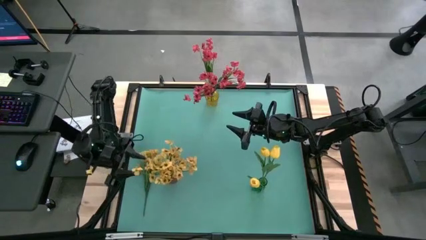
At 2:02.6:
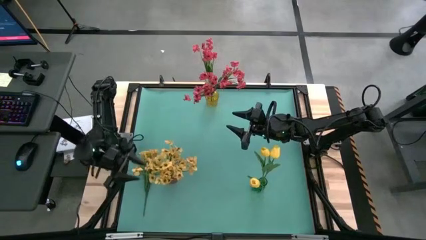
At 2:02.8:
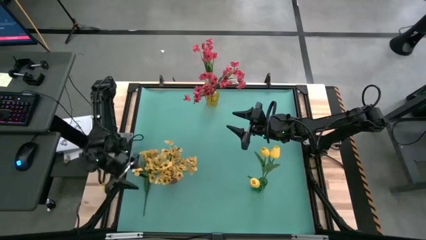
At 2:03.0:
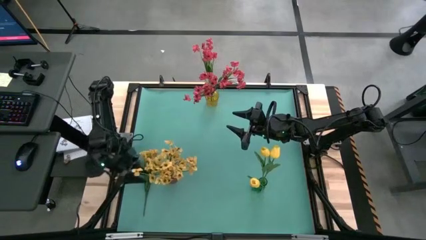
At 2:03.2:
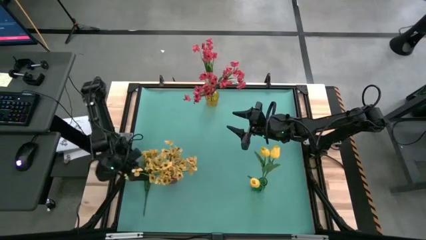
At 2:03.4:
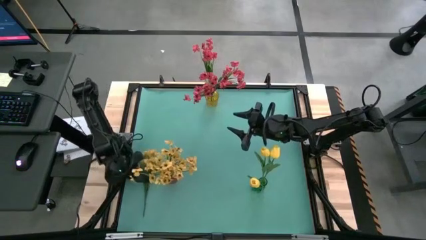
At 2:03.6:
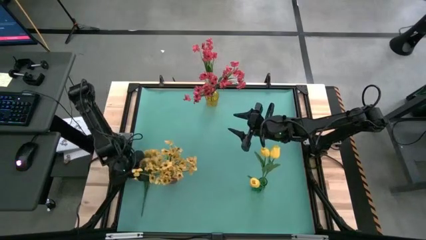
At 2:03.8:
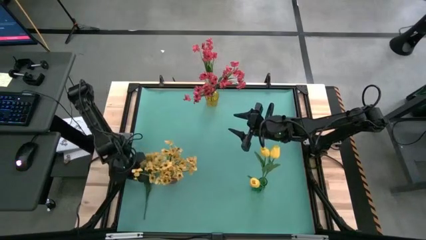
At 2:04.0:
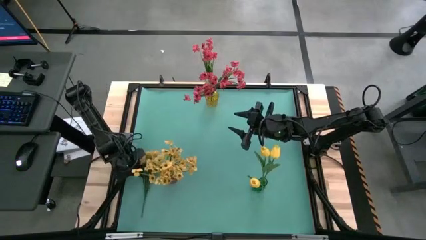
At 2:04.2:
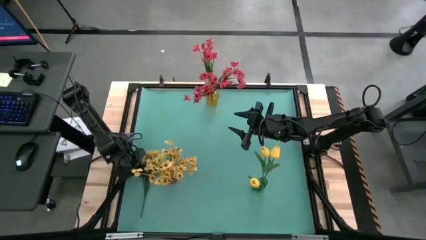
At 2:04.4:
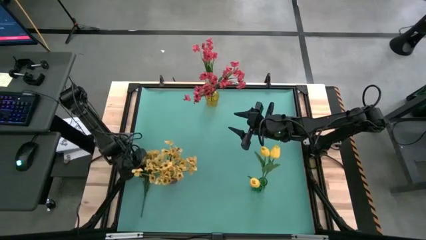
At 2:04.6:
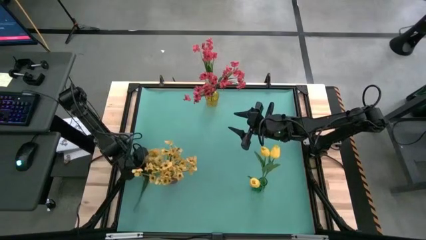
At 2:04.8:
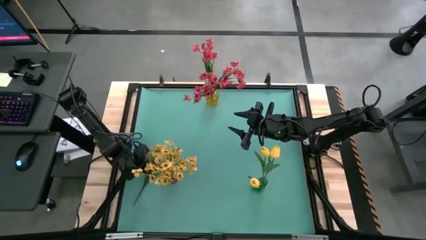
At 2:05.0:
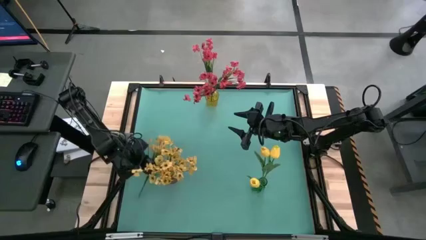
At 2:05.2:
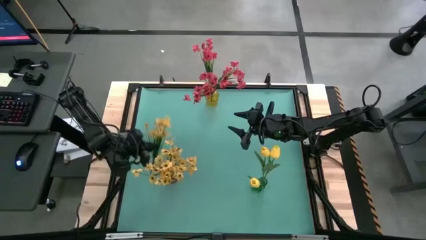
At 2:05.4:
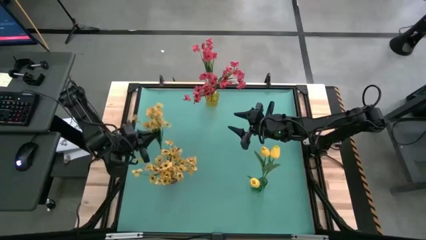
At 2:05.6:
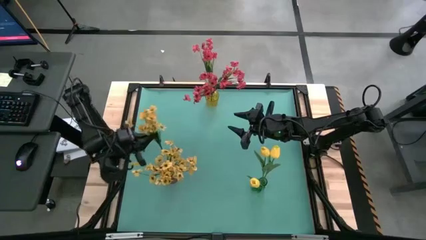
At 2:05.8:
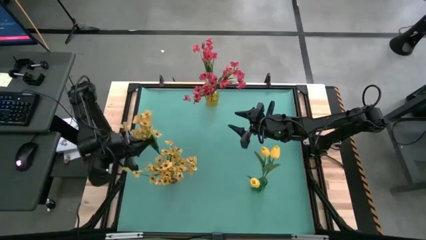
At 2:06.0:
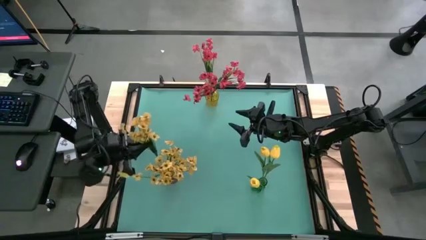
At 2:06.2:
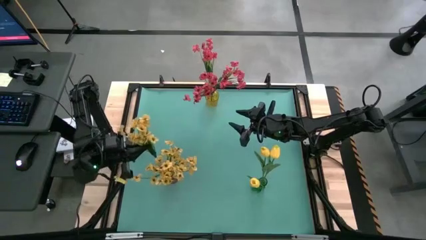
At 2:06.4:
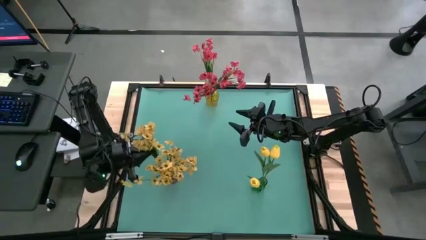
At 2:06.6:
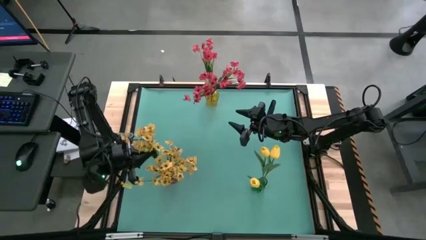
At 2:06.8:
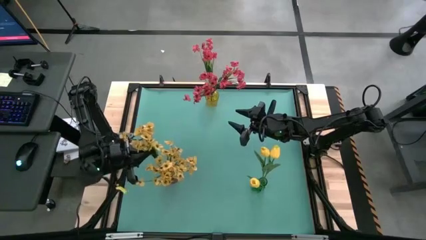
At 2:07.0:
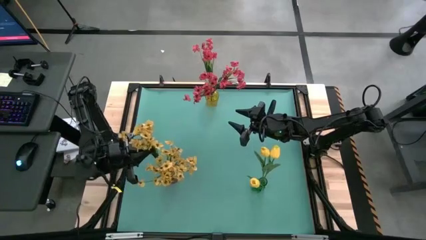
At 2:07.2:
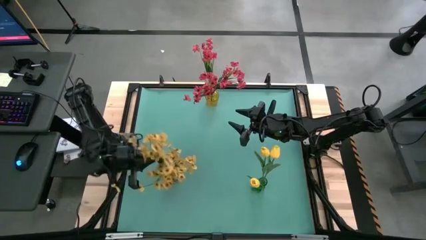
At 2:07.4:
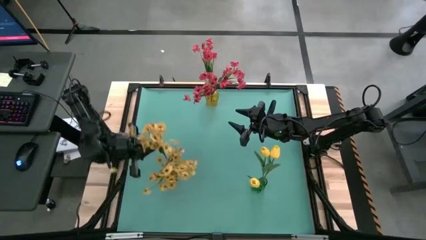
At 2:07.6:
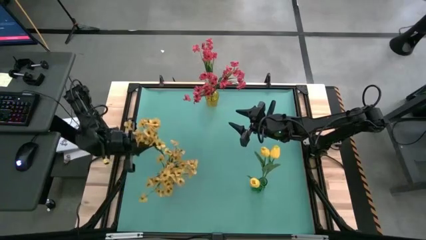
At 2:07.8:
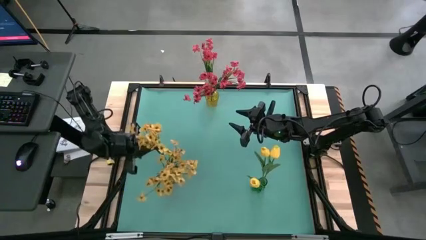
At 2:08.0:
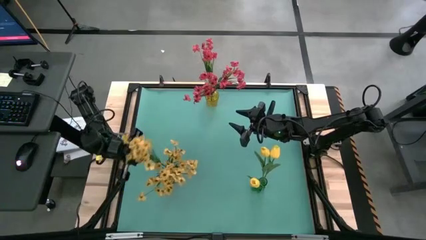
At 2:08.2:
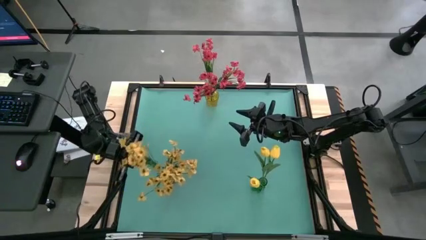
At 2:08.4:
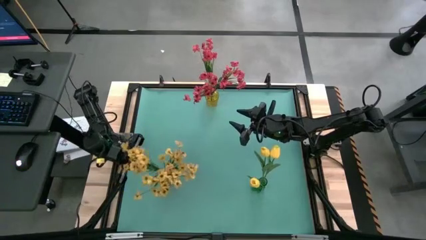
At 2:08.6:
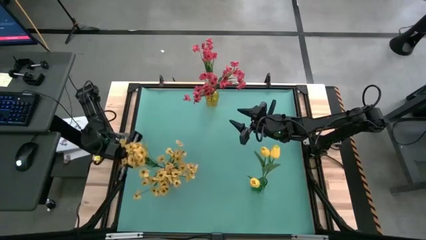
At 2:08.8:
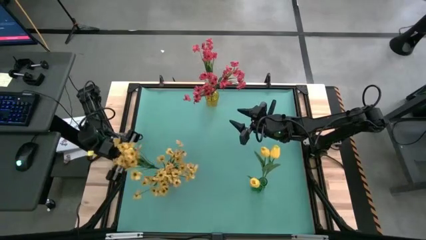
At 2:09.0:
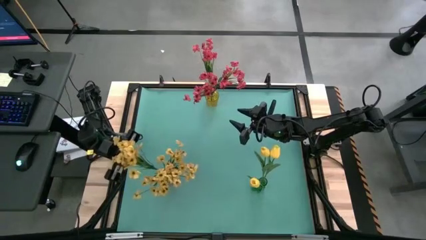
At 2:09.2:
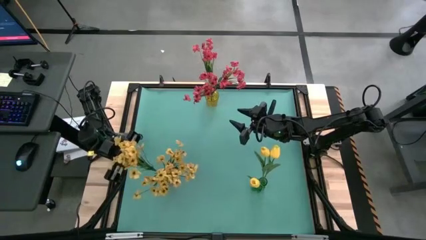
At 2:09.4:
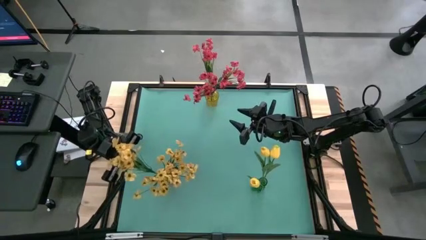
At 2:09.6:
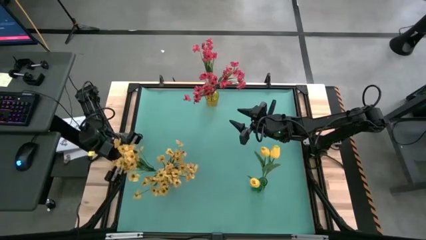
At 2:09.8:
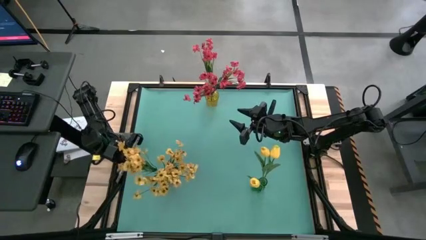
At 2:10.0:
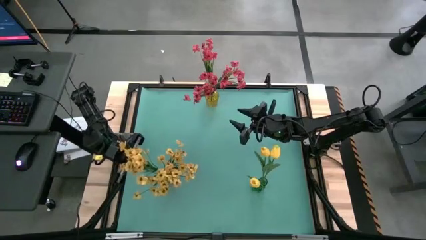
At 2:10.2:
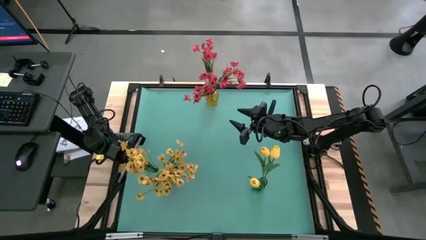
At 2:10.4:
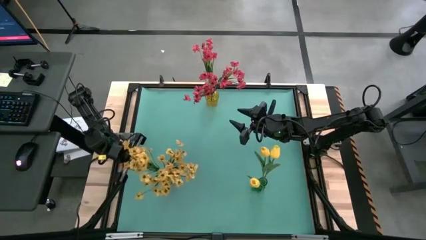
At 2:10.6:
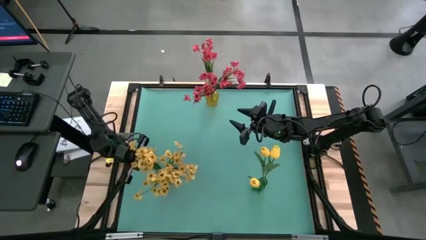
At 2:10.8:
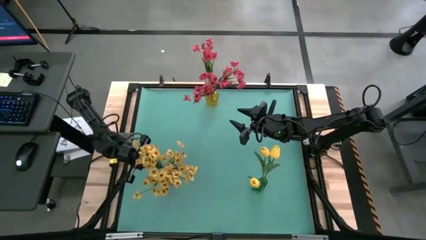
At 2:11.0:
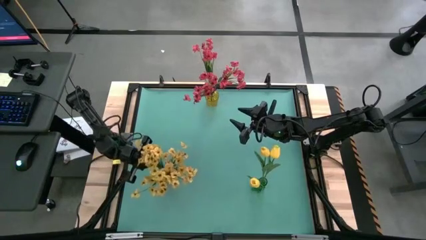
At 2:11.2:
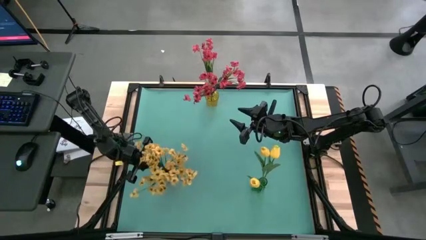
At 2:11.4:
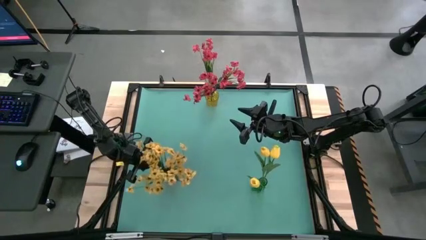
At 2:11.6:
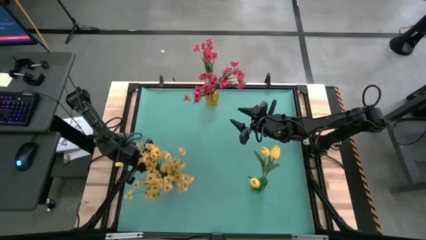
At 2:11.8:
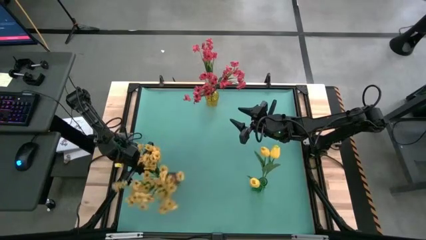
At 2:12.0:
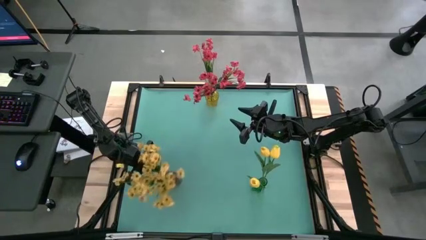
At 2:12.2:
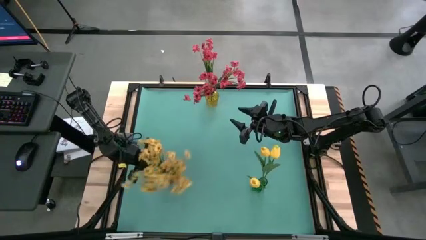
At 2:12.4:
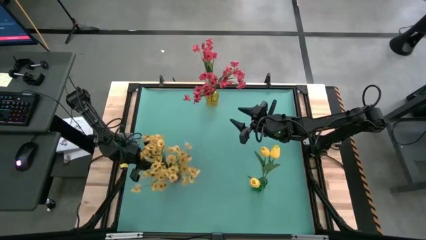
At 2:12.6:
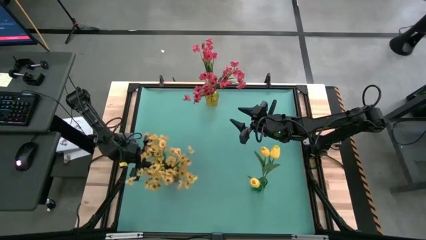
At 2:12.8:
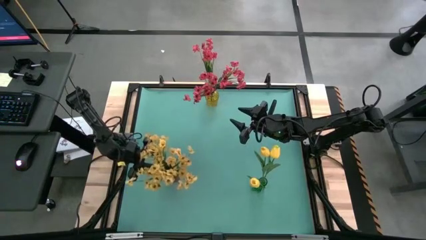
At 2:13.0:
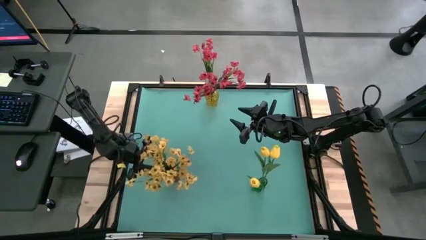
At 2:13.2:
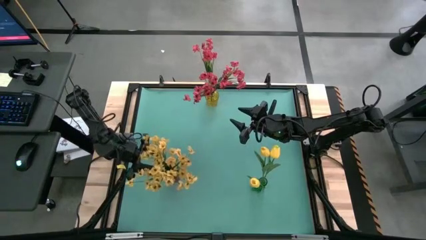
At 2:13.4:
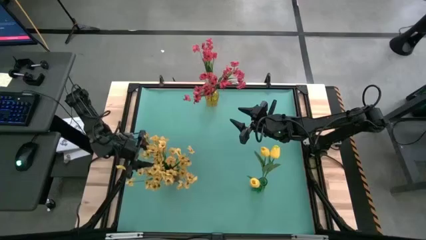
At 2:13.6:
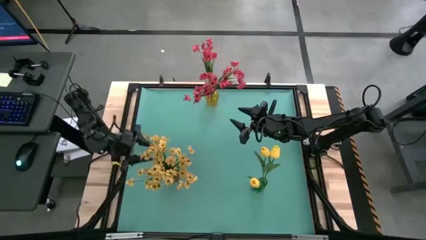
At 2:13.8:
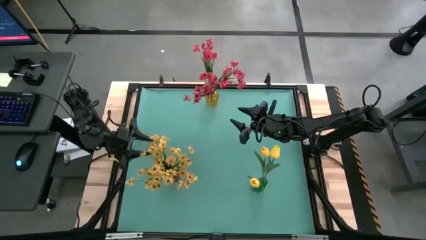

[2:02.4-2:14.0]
Task: Sort flowers into vase by color
Put the yellow flowers into the red vase
